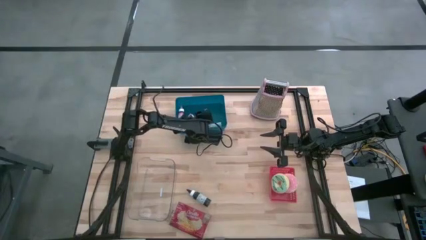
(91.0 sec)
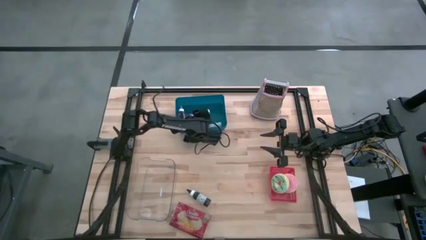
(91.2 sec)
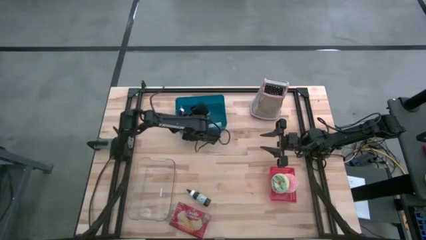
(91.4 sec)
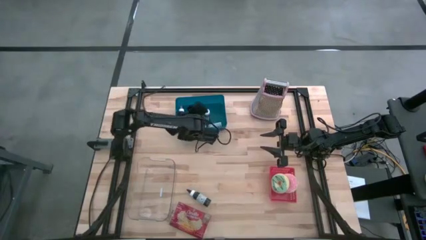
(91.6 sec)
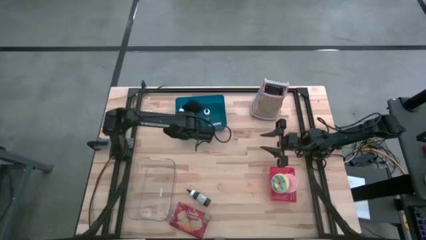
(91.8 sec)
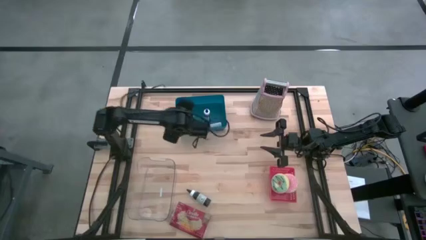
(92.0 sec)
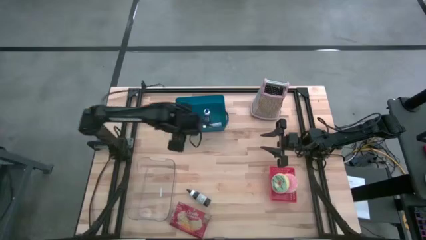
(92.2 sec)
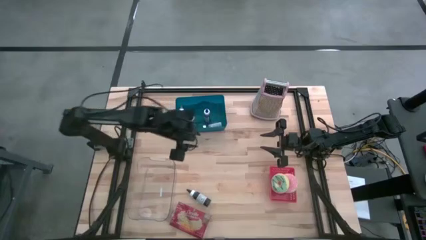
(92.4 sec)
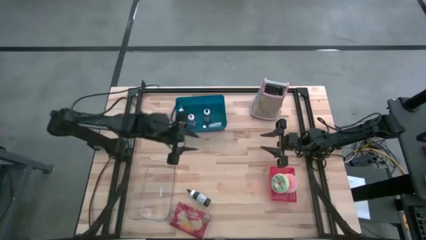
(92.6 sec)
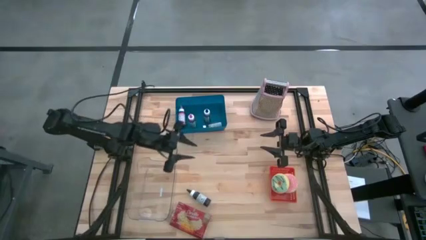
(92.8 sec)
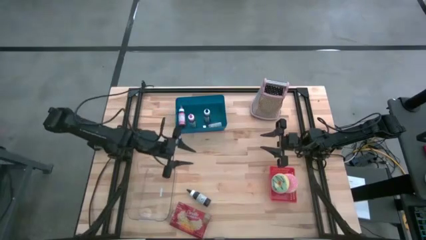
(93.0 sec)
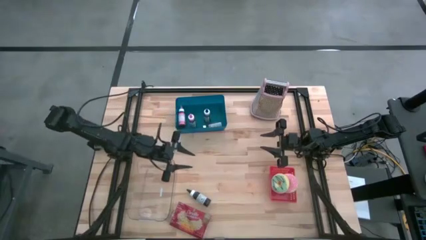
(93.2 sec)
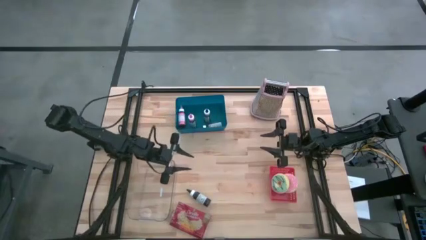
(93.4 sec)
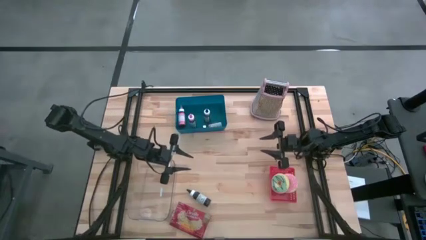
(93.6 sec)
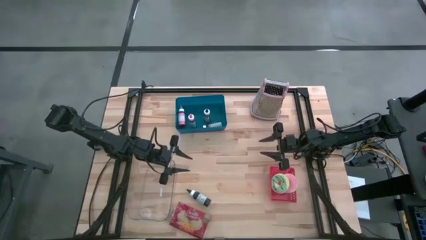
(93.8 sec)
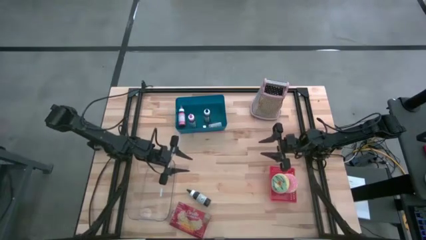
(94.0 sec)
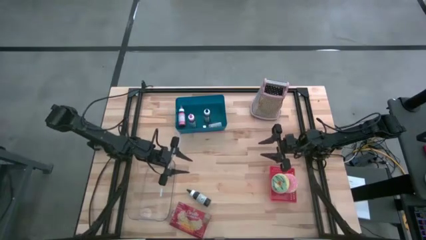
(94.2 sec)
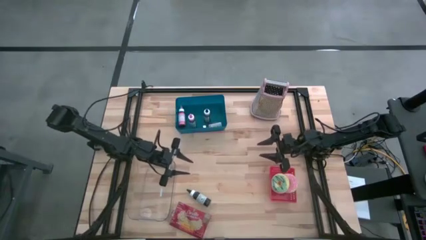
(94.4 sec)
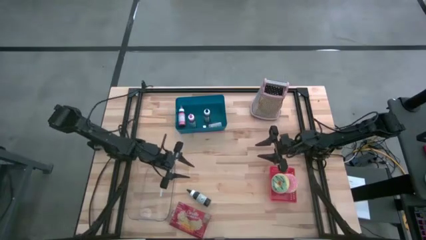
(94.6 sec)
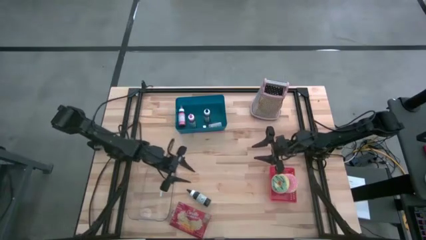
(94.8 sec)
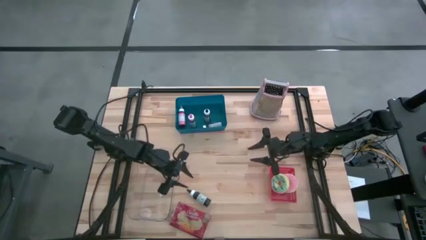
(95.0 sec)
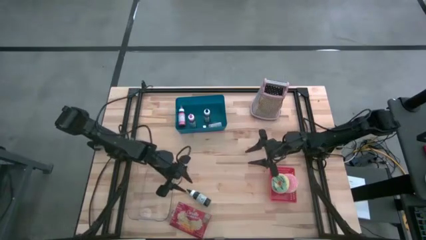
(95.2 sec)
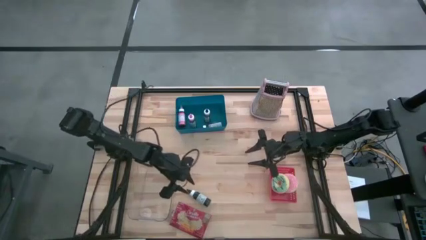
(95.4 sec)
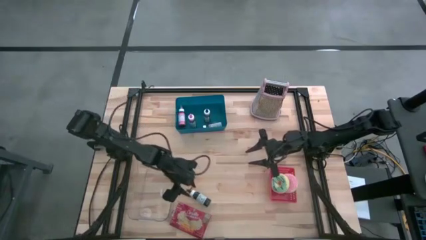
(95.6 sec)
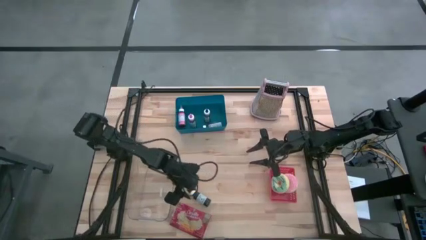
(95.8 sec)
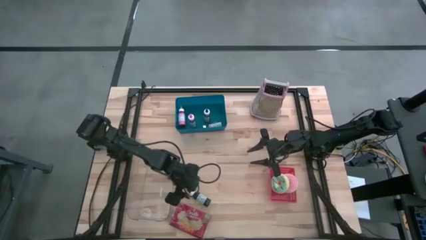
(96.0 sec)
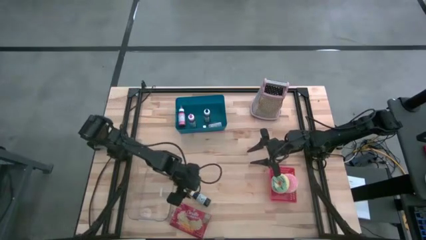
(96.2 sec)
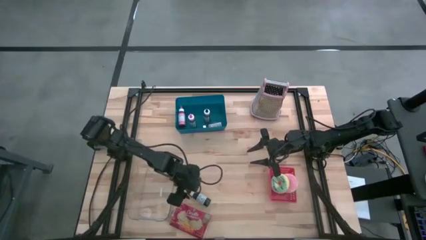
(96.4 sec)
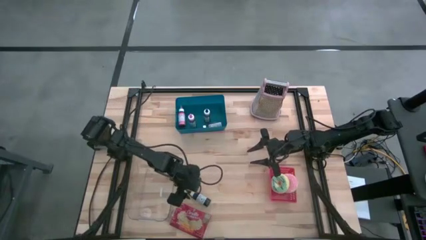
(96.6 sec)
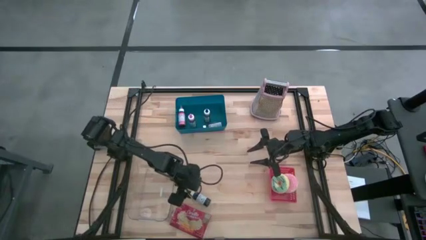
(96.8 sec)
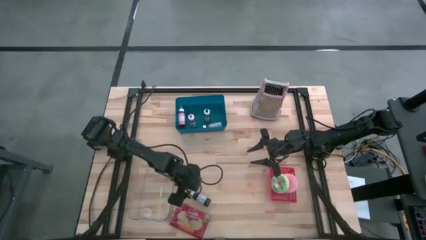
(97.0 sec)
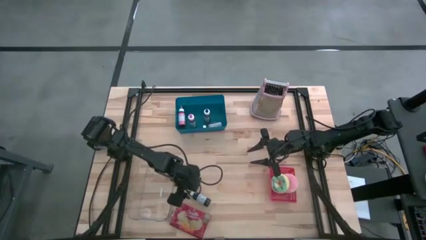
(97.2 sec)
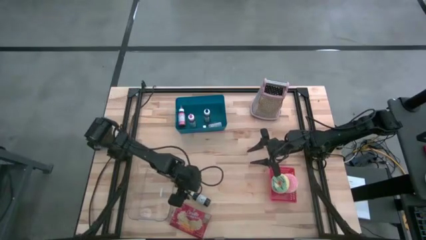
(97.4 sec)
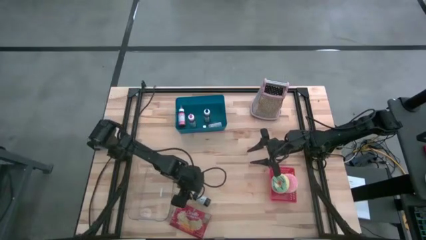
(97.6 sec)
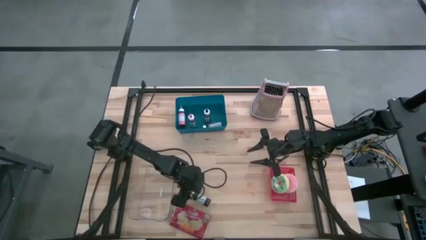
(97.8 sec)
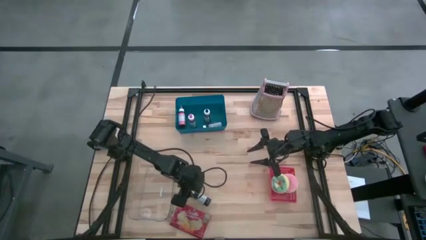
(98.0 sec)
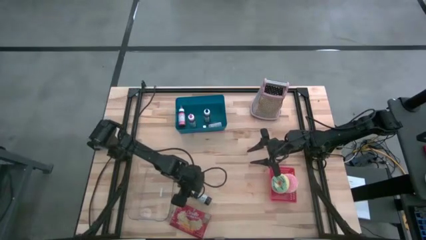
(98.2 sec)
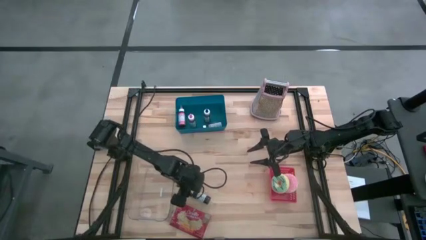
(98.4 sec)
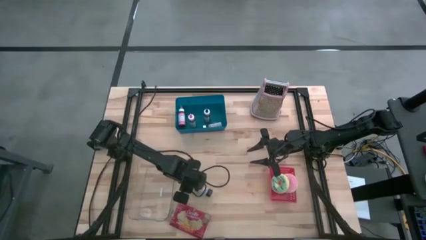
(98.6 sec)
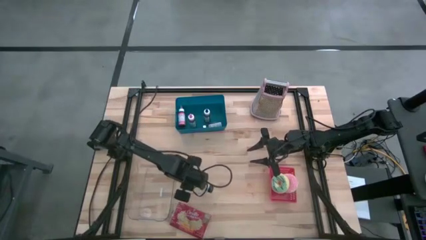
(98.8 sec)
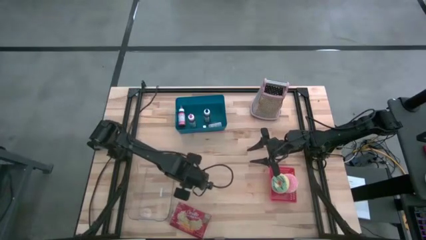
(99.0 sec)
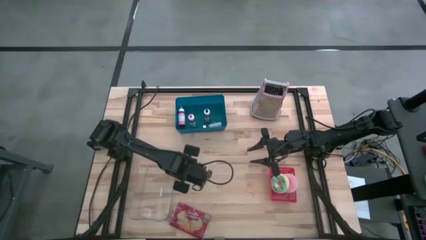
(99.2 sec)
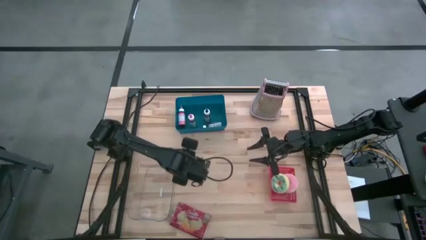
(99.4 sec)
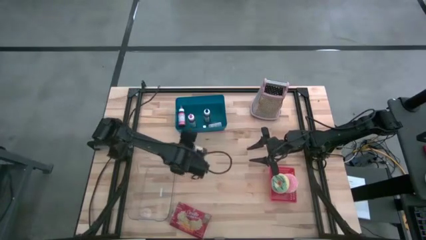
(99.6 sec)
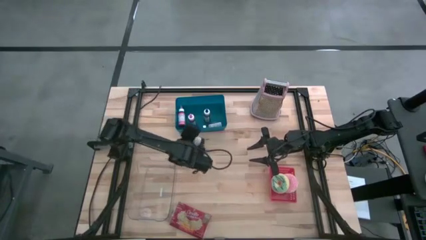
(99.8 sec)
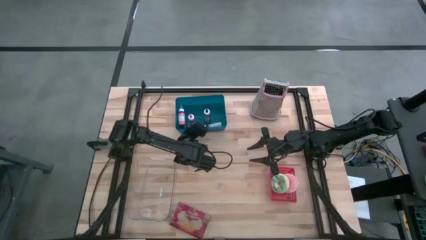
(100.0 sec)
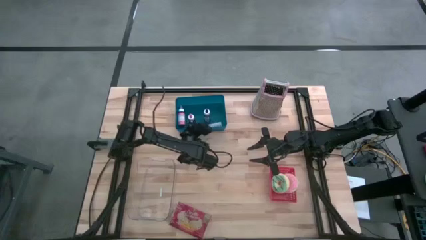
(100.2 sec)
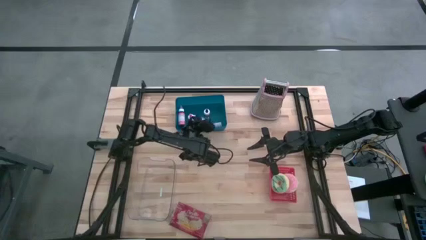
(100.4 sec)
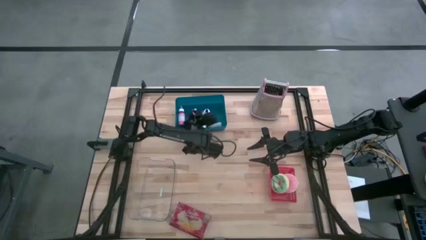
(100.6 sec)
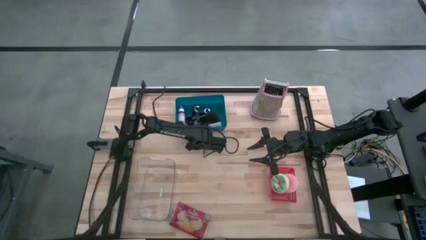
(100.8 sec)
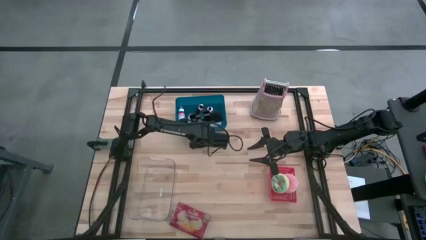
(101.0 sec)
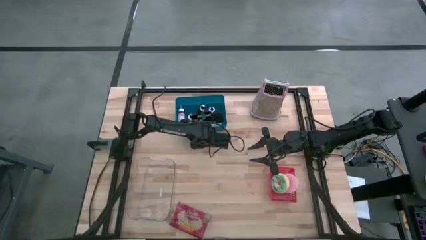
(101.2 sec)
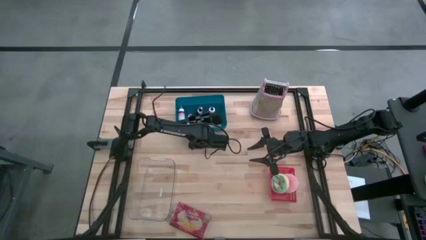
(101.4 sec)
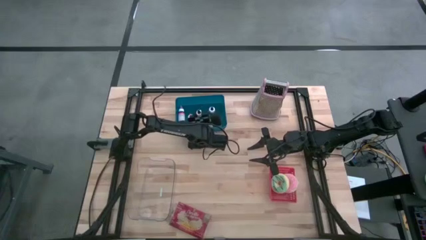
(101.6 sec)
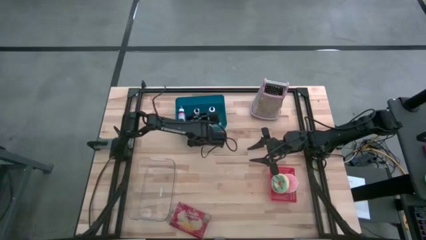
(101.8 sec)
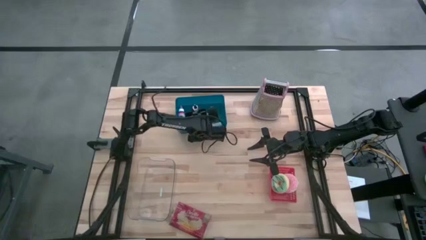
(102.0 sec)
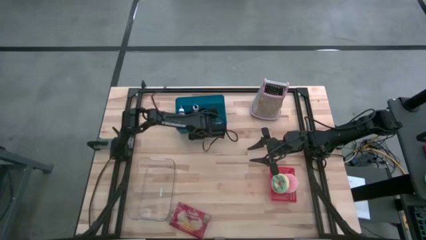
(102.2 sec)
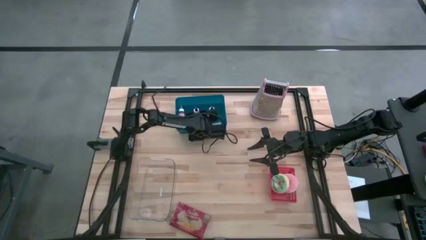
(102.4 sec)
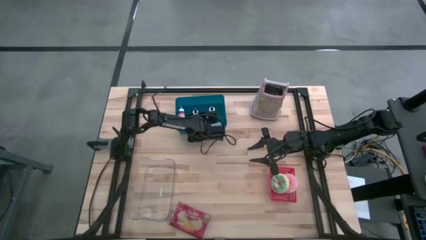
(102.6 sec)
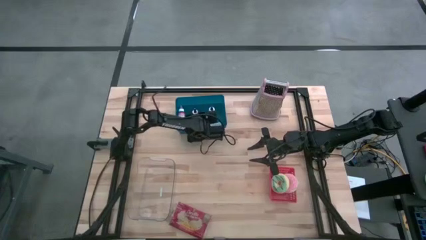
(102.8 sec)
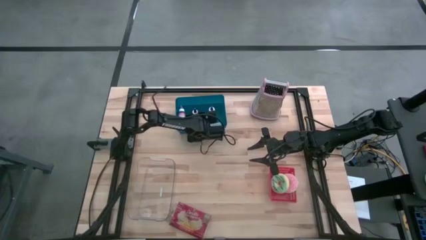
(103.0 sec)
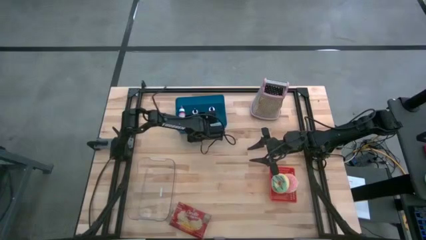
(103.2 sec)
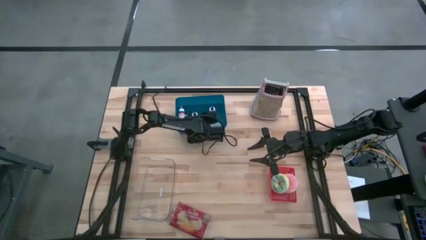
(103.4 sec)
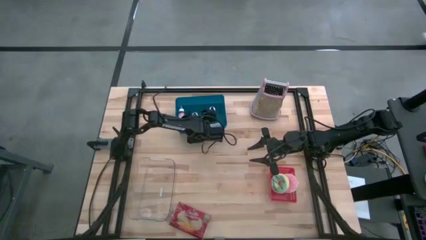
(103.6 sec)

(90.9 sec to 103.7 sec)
Task: Pick & Place Food Item
Put the black food coloring bottle into the blue bin

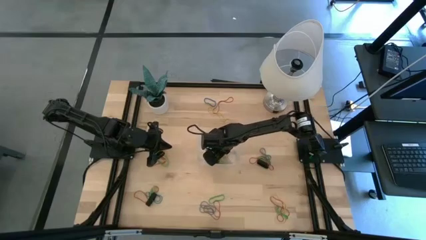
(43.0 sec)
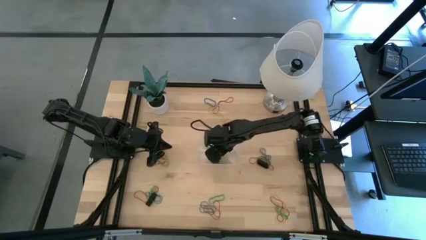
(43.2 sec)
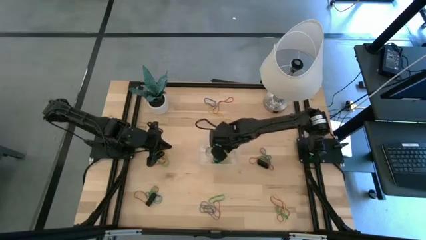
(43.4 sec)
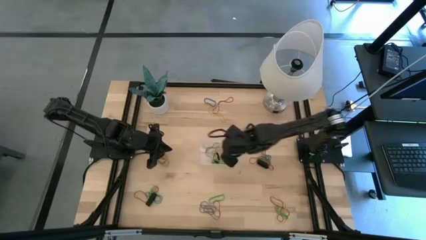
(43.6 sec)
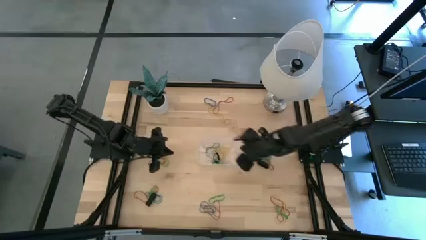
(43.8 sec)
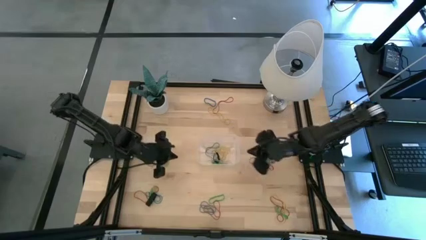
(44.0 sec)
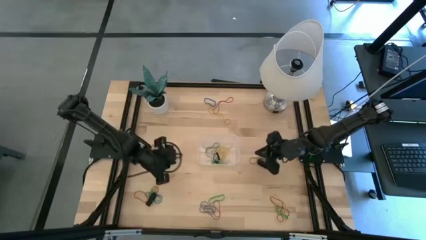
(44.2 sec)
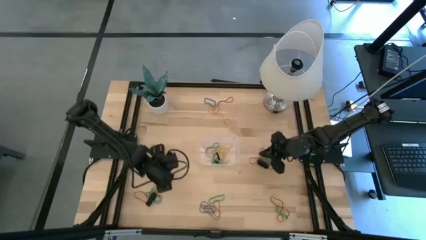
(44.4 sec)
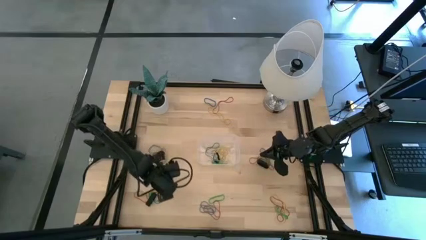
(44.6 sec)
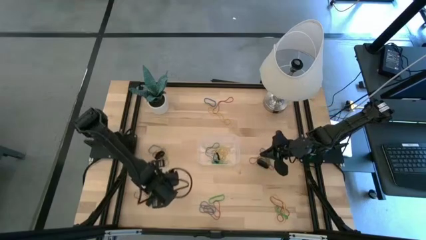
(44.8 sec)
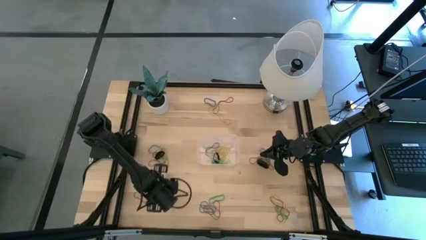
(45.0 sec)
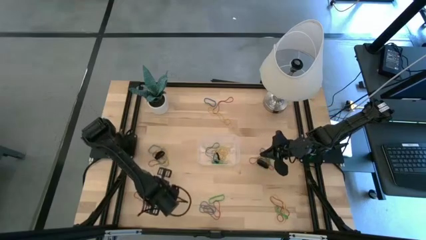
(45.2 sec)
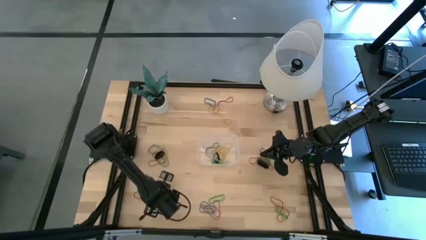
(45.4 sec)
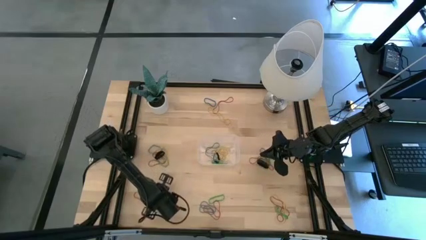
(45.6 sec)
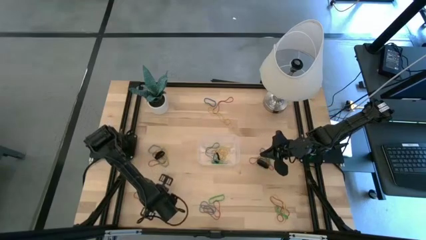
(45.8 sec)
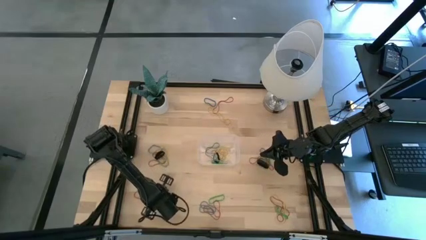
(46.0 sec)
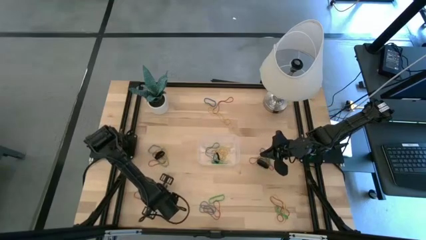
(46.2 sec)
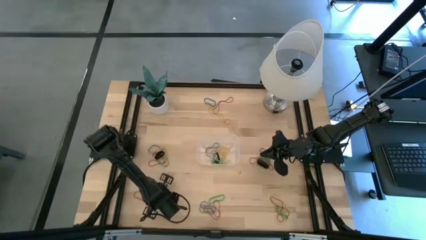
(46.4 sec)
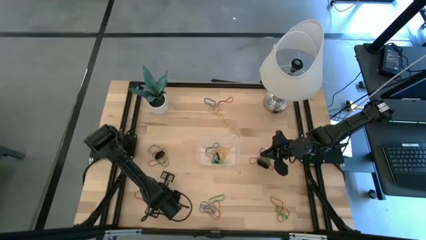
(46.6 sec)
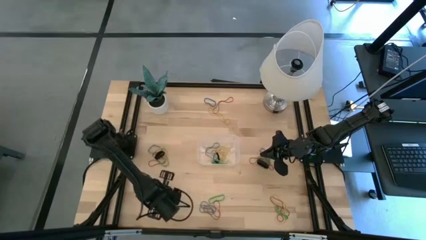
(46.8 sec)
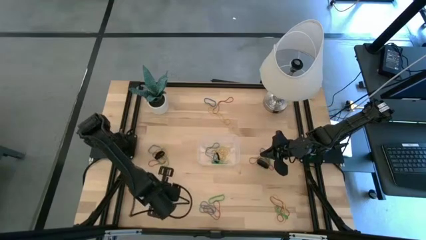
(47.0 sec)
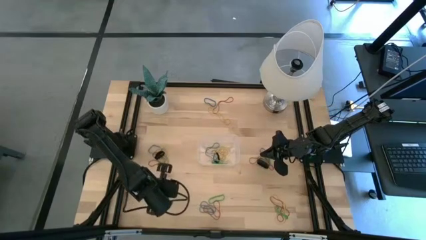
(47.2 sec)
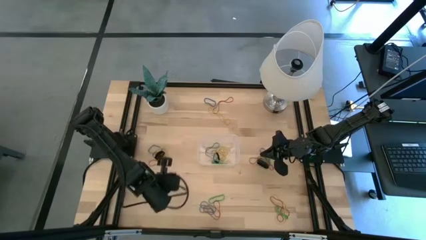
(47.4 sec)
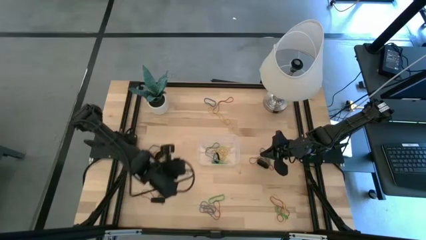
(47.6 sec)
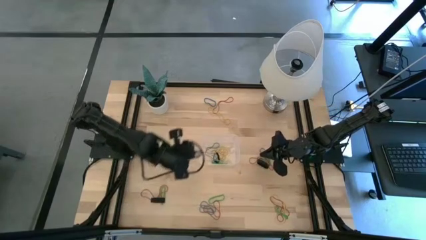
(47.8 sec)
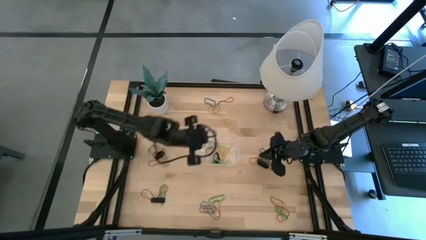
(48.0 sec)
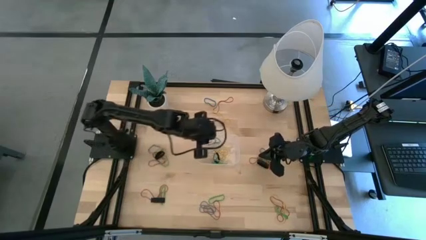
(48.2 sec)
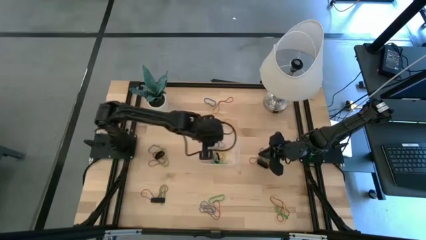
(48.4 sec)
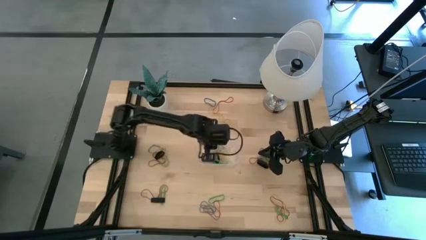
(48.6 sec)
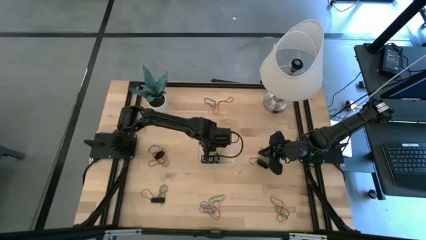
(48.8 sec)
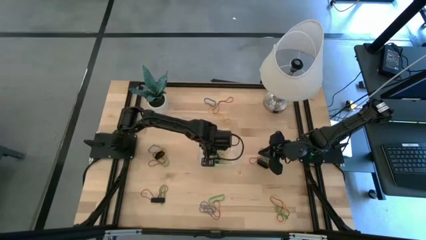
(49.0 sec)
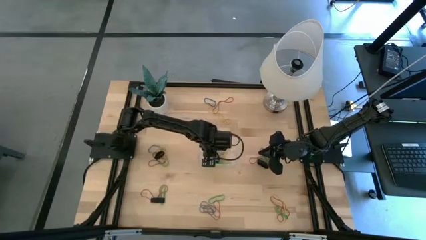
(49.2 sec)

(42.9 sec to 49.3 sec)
Task: Pick and place rubber bands into bin
Put the blue rubber band into the transparent bin
